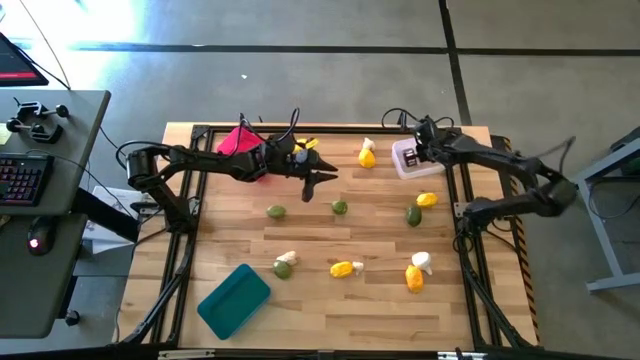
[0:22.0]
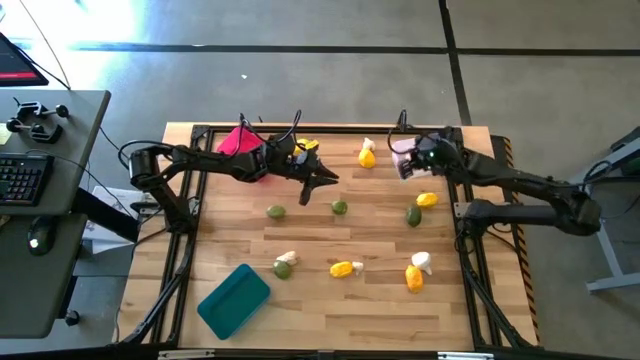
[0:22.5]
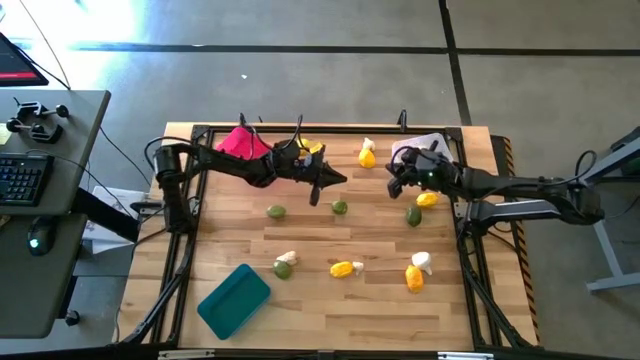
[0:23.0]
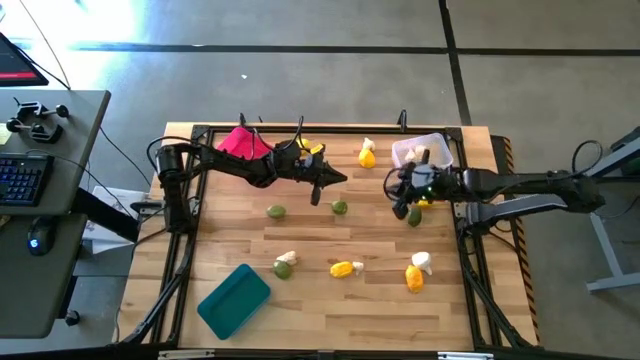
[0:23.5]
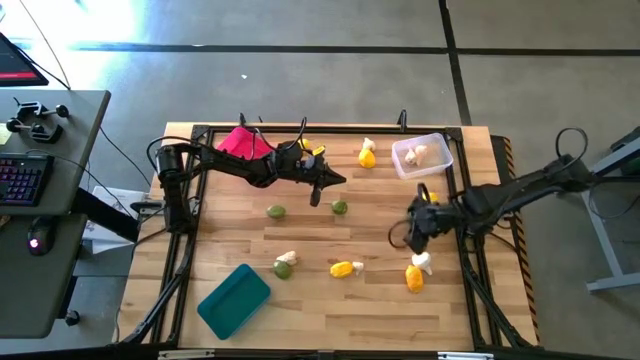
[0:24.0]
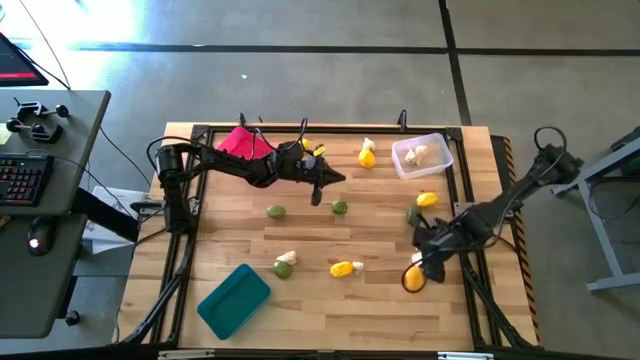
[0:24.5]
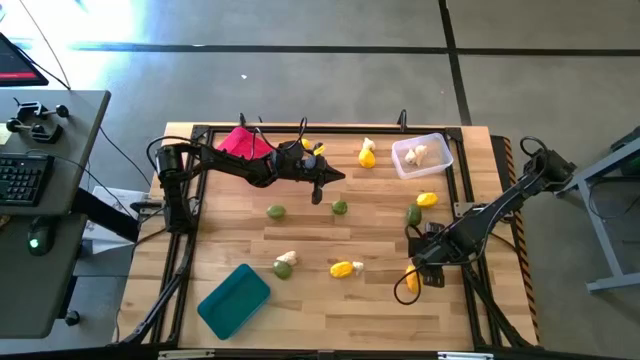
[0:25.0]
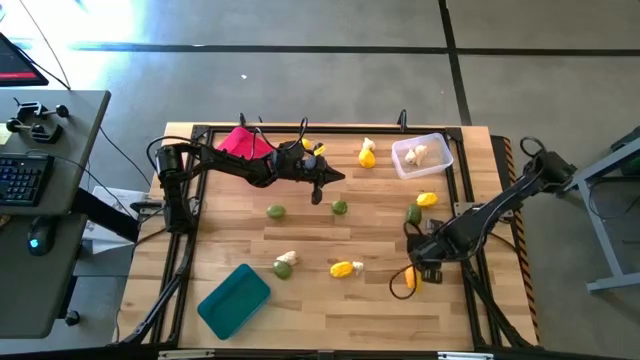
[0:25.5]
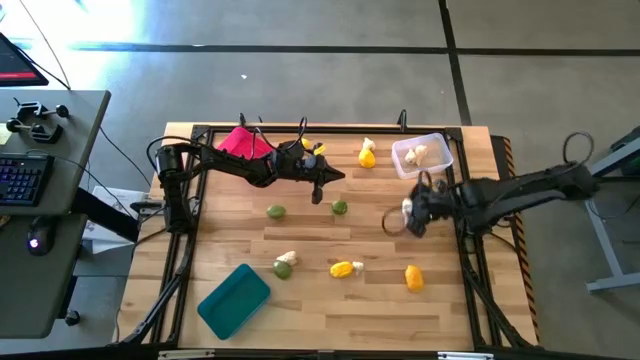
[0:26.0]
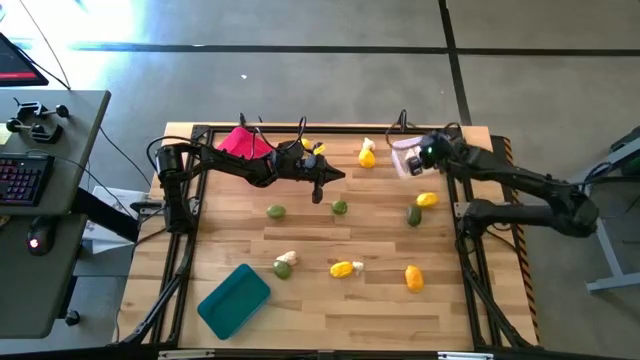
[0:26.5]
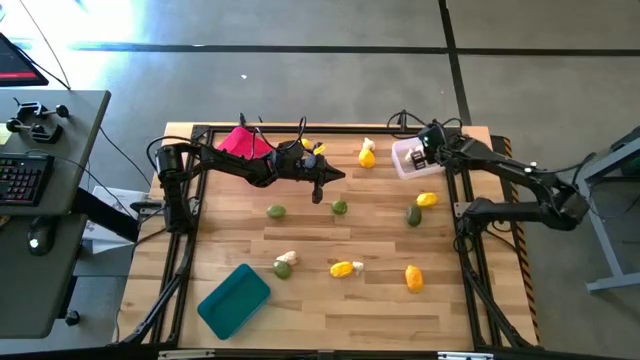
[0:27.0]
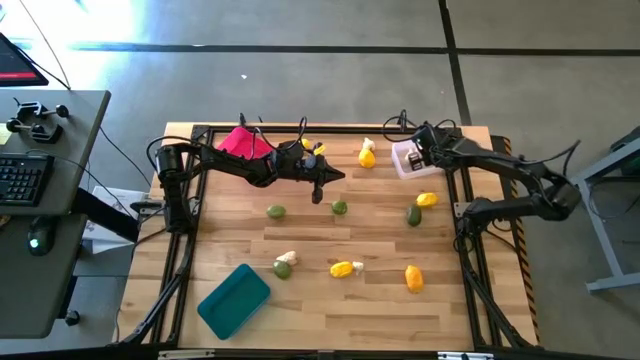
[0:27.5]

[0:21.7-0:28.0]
Task: Sort produce into baskets
Put the white garlic in the transparent bin

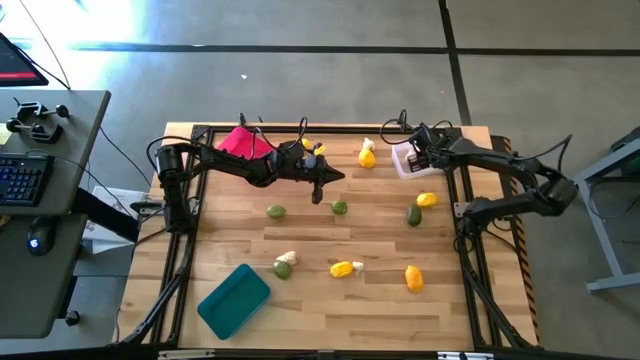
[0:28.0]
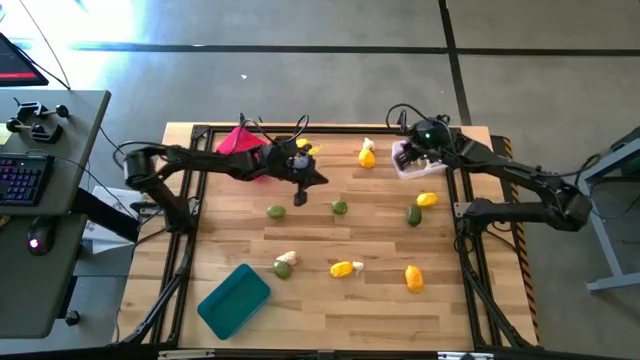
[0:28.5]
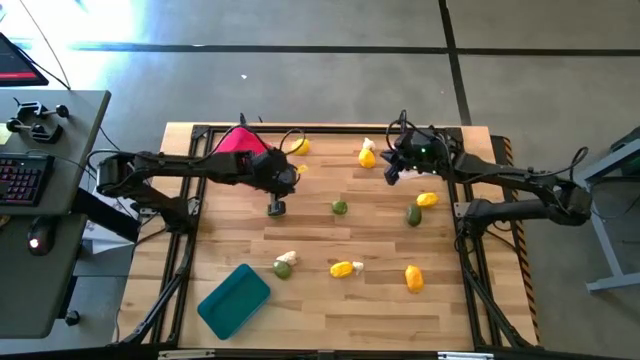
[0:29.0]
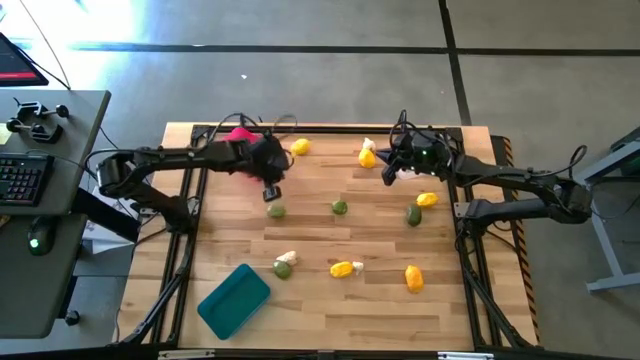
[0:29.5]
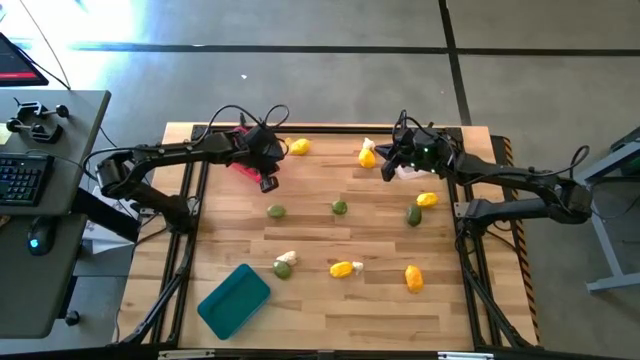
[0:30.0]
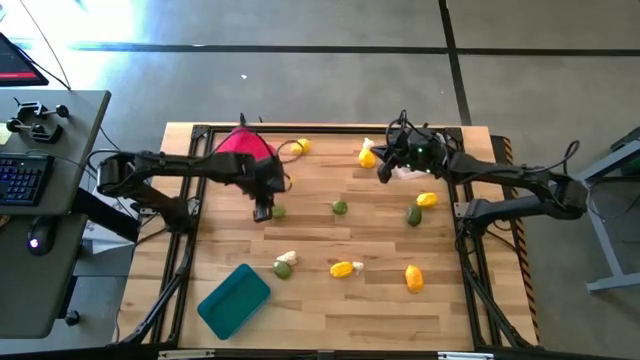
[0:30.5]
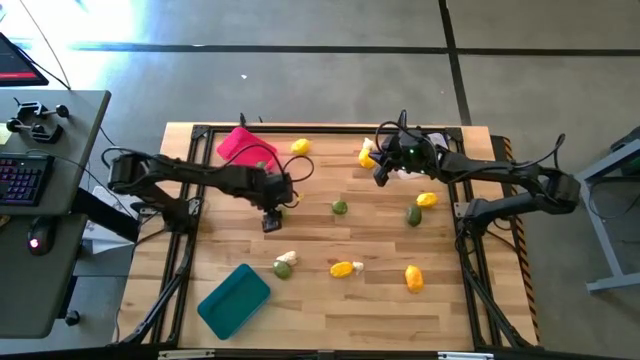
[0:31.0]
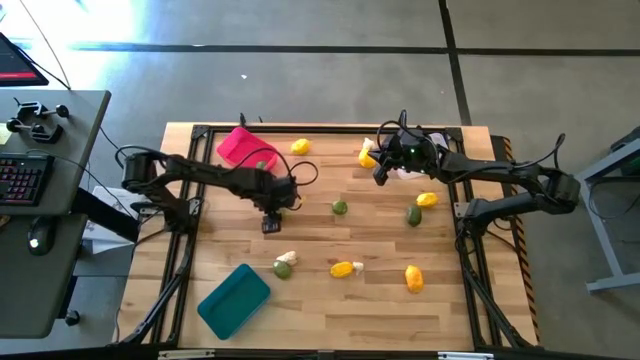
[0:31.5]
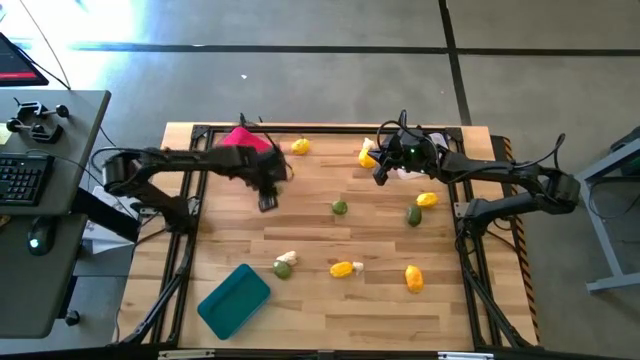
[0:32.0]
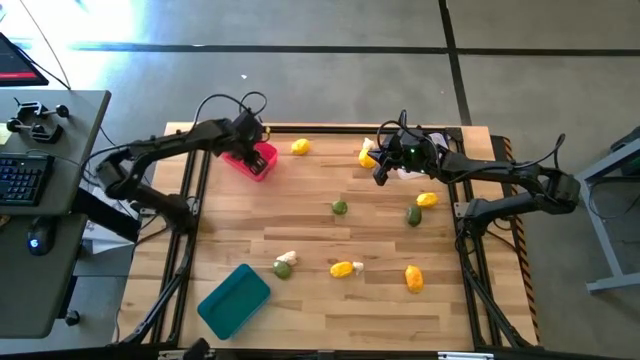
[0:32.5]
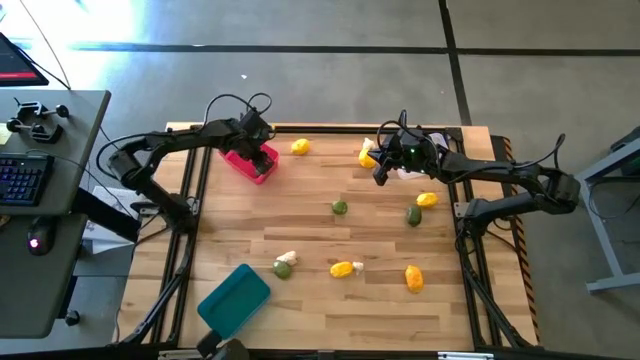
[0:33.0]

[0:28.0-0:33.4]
Put the green lime in the red bin

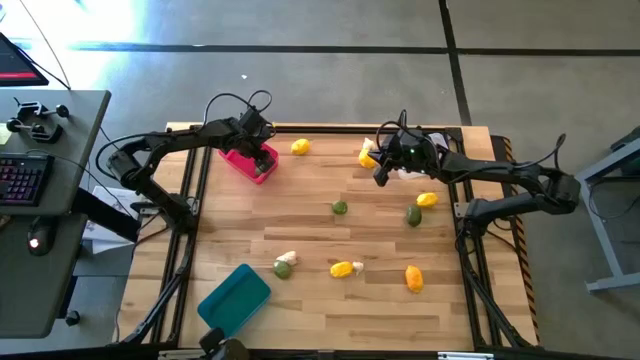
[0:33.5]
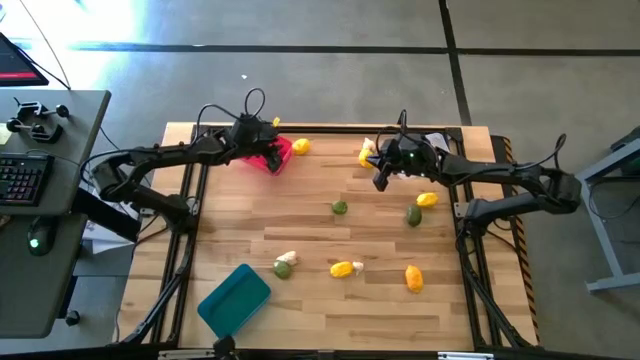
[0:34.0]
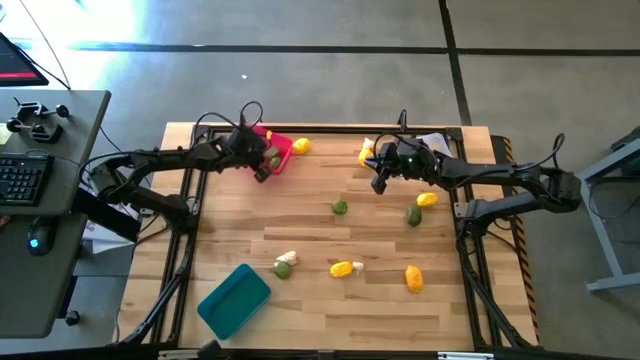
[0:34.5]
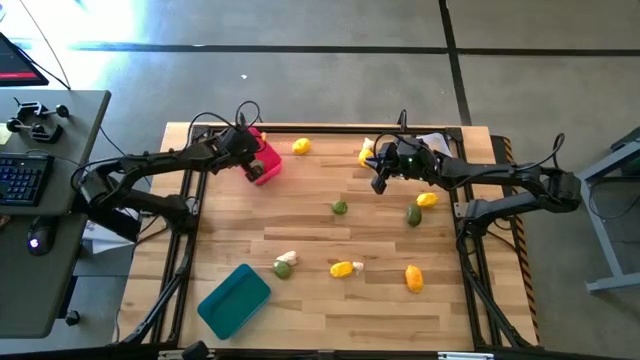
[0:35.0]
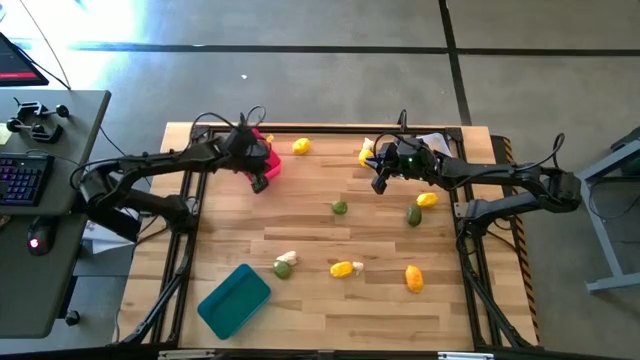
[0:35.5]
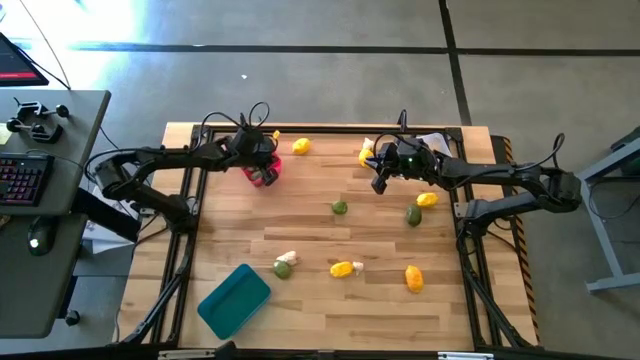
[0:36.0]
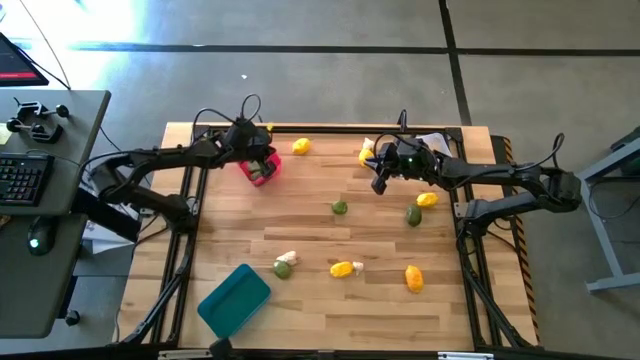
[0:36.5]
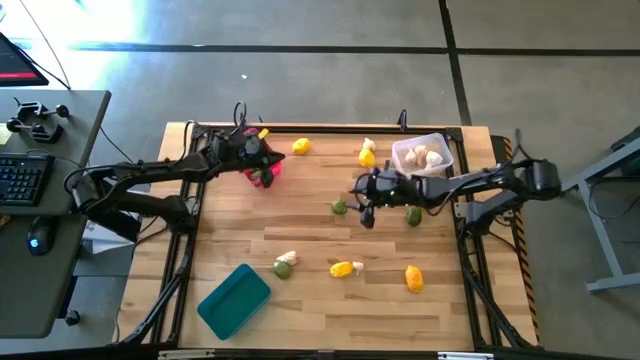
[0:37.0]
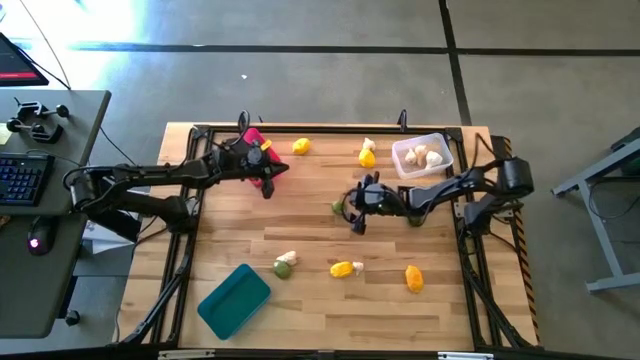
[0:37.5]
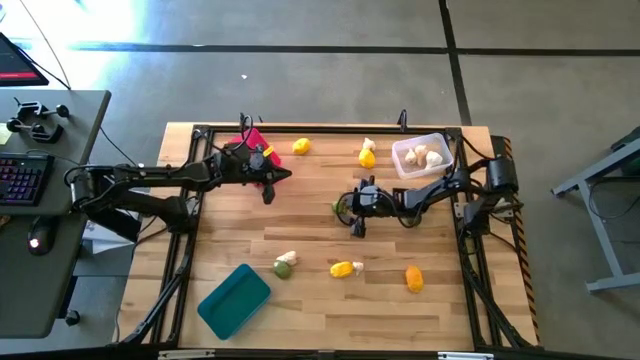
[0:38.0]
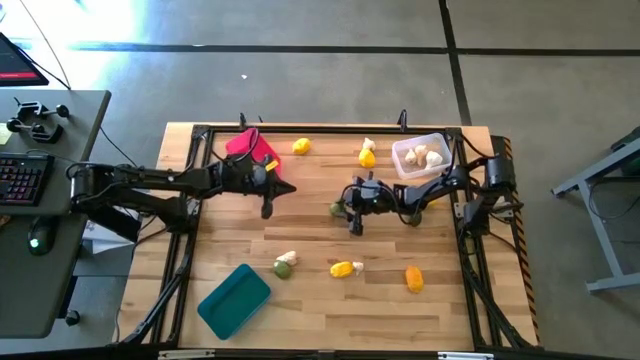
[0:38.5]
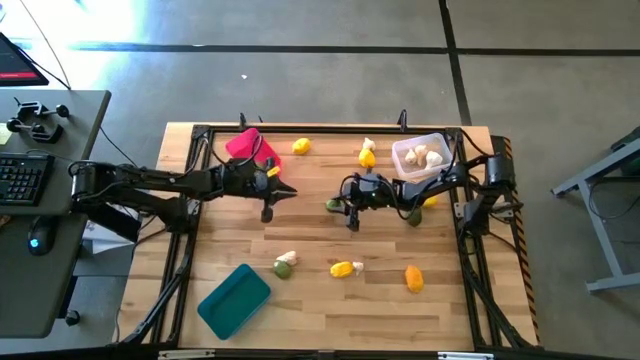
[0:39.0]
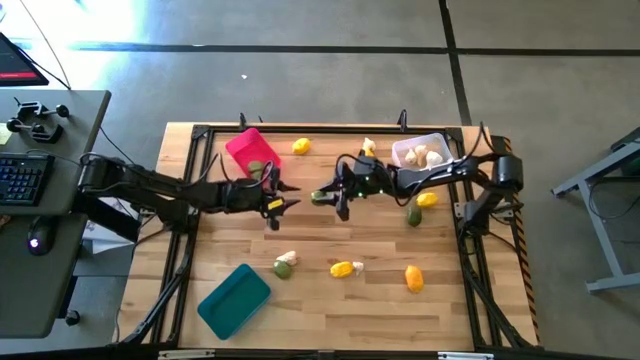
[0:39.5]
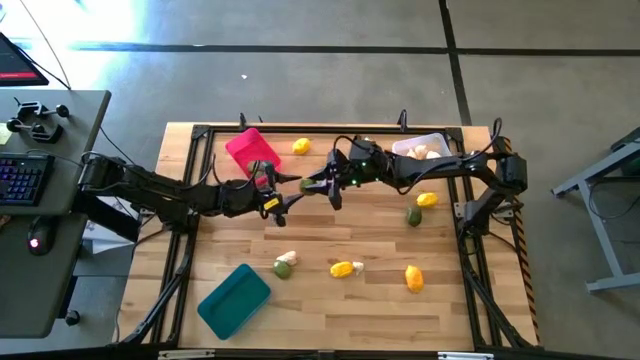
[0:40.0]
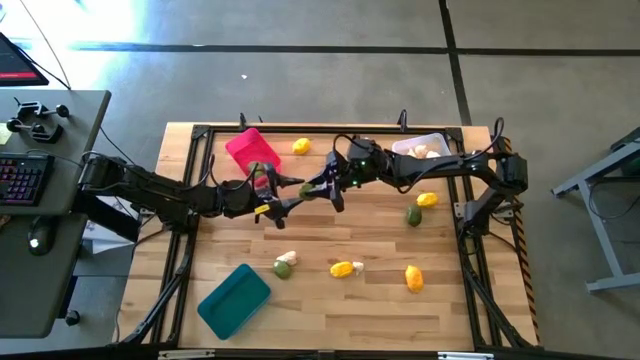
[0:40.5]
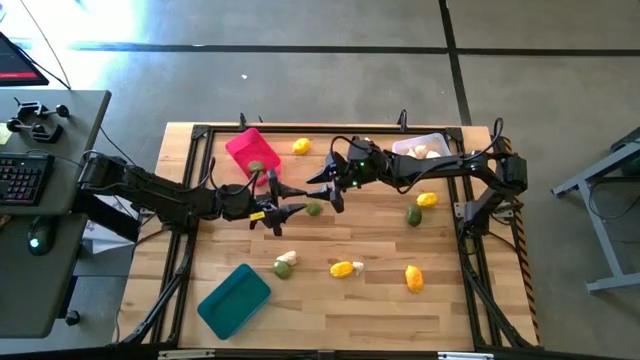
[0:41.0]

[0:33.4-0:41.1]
Put the green lime in the red bin

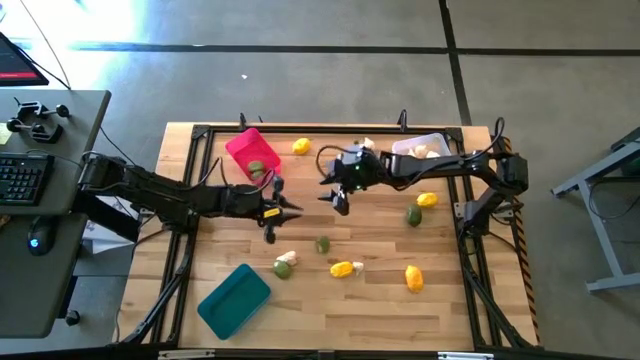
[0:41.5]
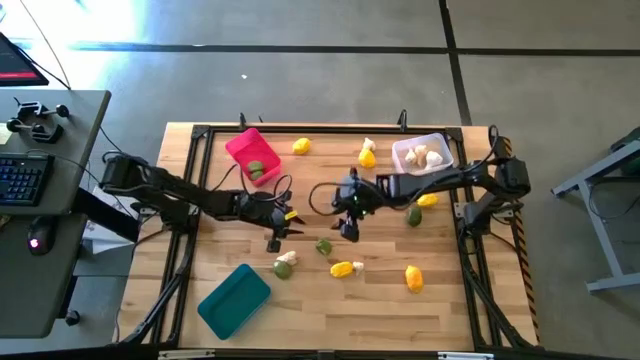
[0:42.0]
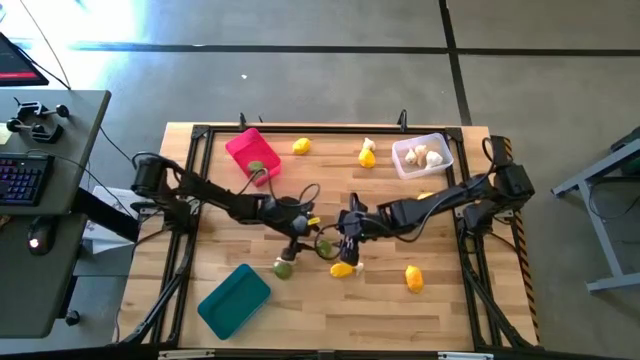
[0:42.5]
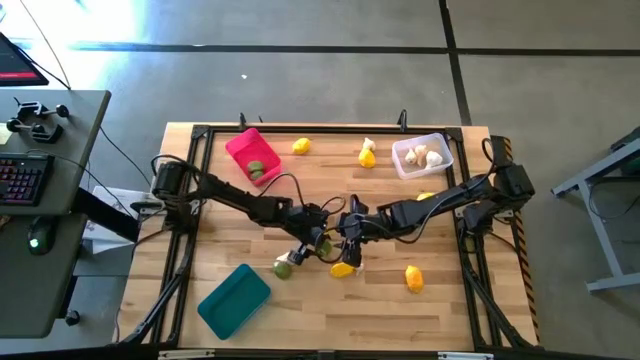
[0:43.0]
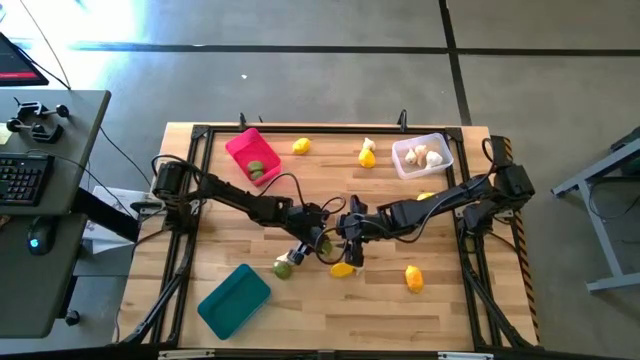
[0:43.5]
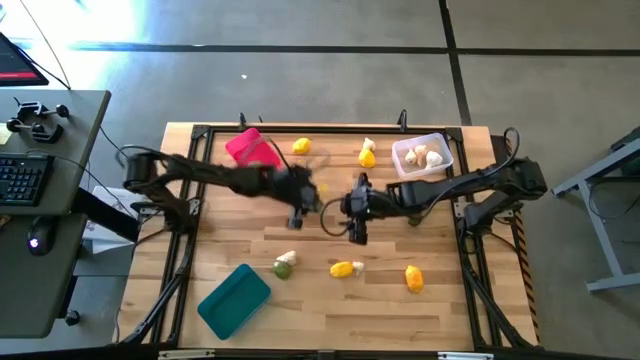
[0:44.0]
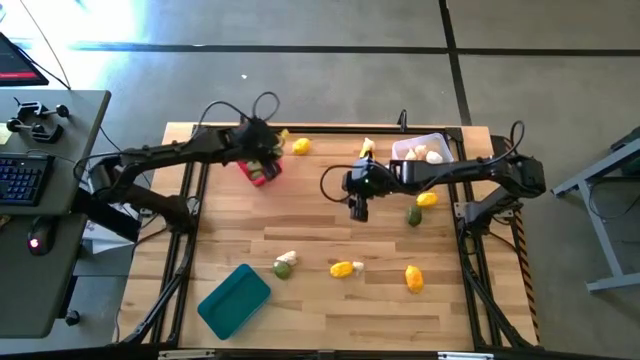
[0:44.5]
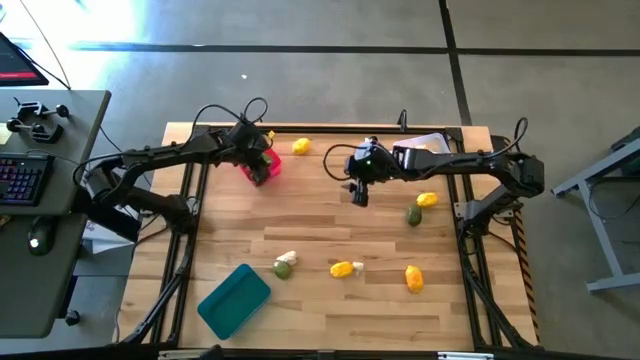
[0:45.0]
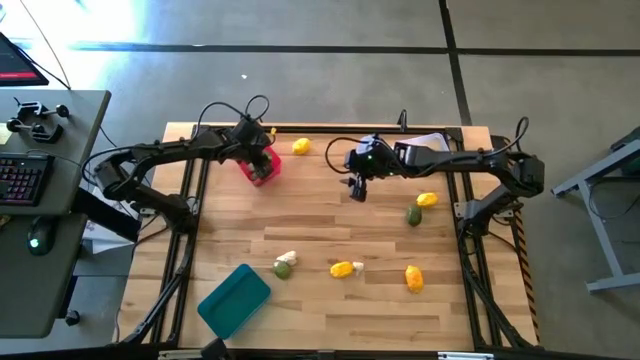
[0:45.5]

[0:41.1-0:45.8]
Put the green lime in the red bin
